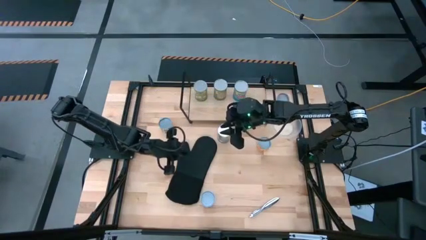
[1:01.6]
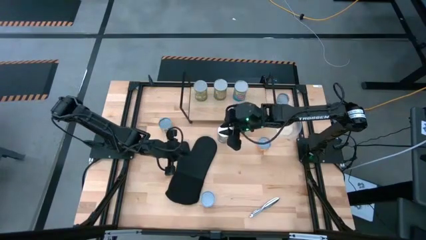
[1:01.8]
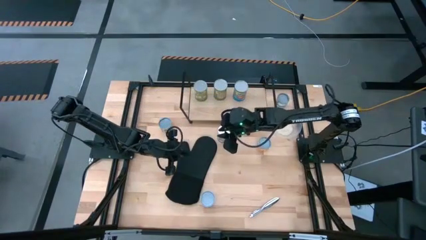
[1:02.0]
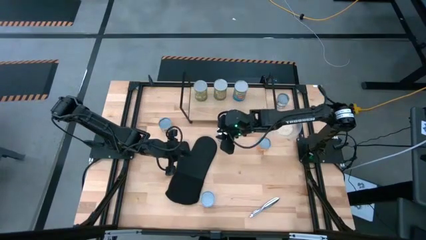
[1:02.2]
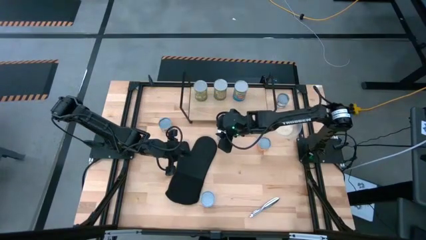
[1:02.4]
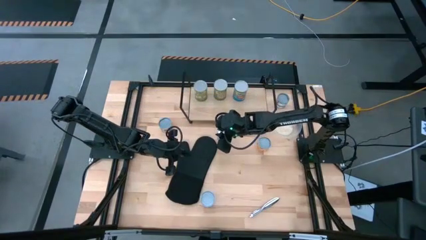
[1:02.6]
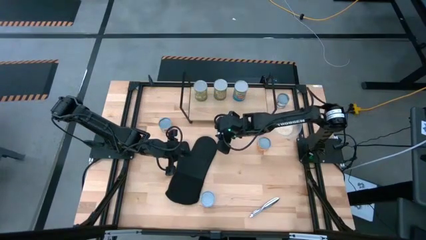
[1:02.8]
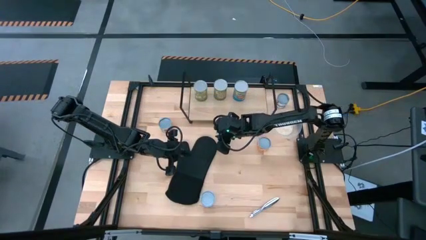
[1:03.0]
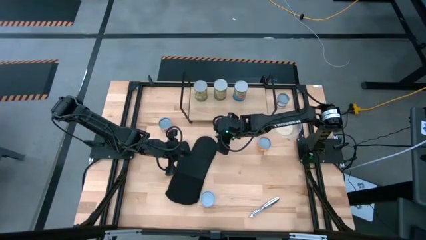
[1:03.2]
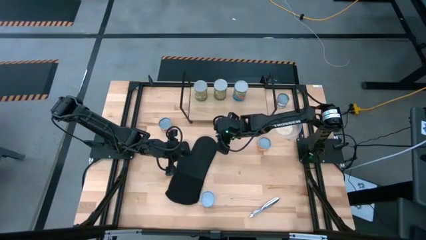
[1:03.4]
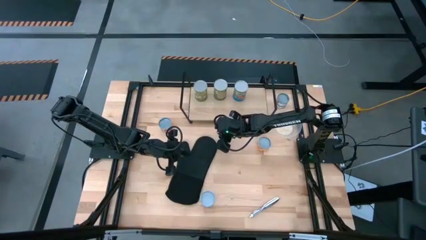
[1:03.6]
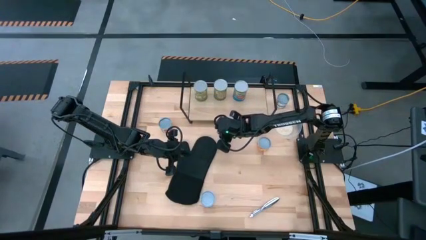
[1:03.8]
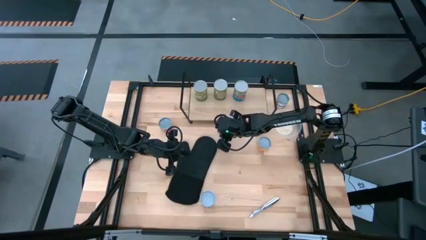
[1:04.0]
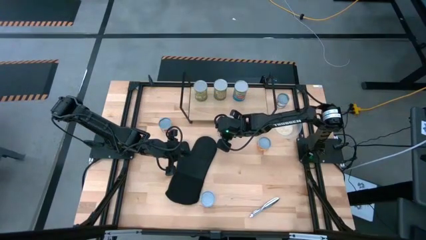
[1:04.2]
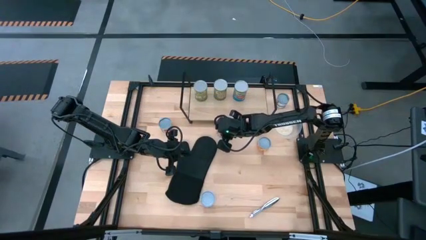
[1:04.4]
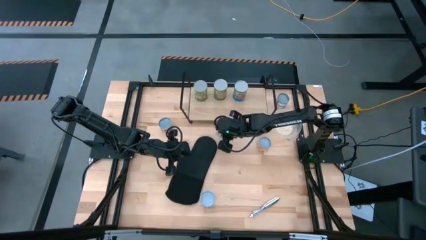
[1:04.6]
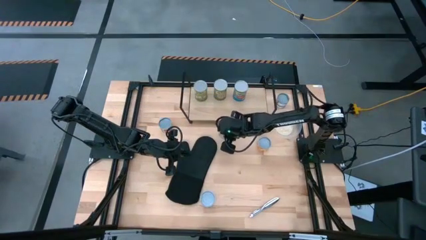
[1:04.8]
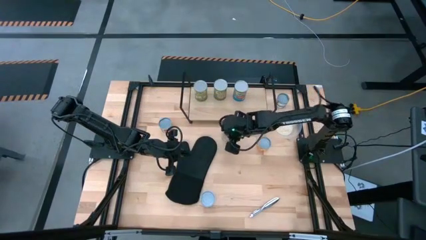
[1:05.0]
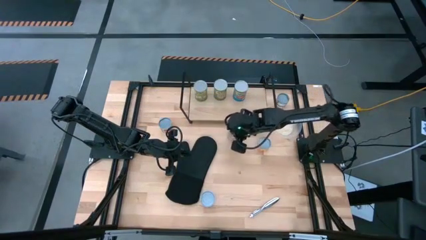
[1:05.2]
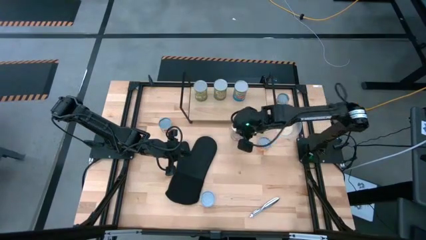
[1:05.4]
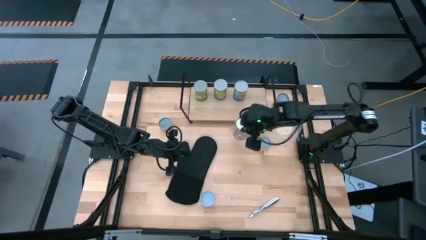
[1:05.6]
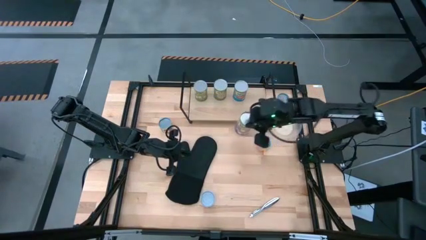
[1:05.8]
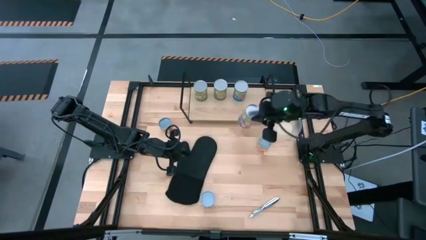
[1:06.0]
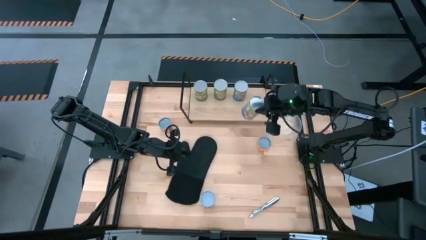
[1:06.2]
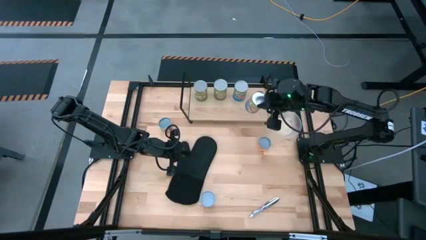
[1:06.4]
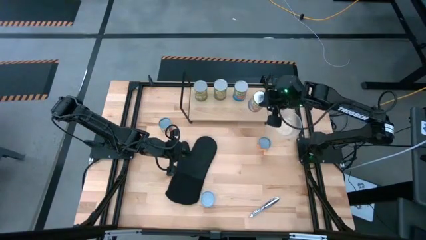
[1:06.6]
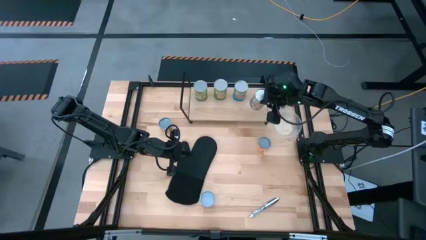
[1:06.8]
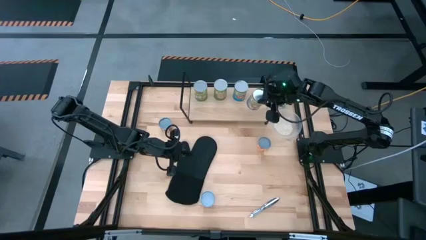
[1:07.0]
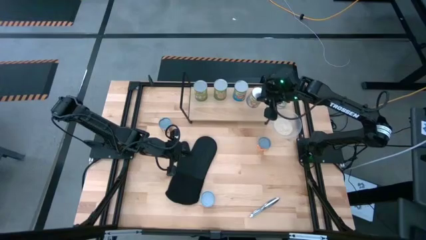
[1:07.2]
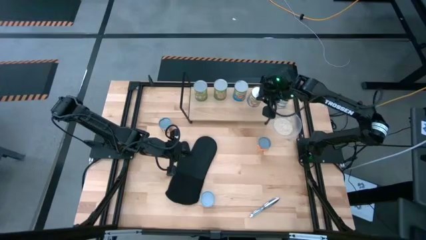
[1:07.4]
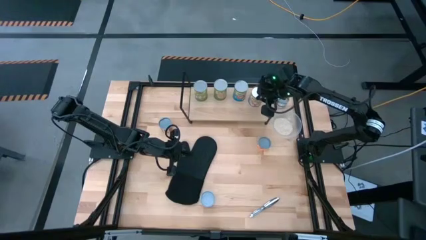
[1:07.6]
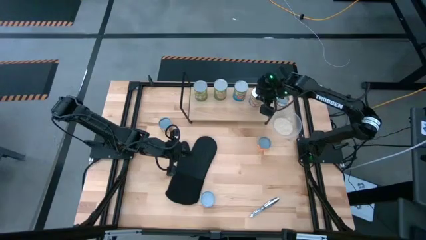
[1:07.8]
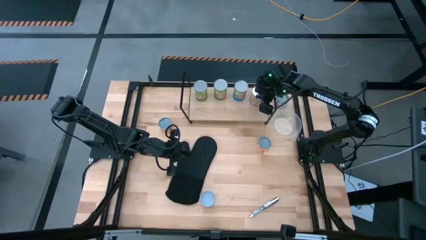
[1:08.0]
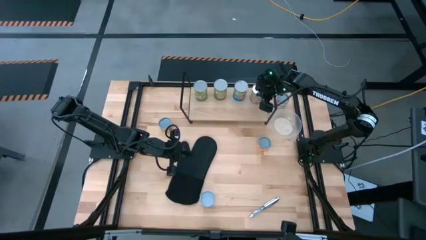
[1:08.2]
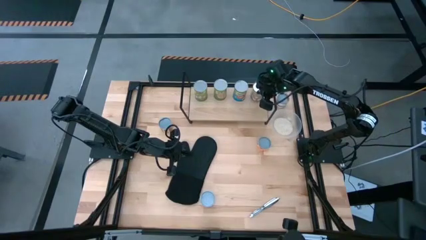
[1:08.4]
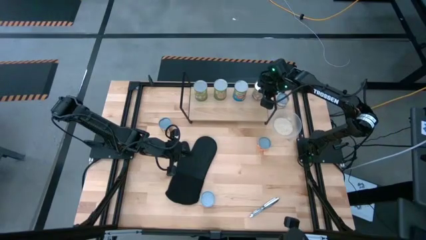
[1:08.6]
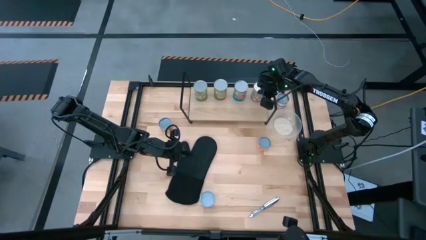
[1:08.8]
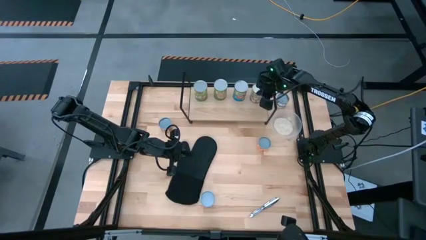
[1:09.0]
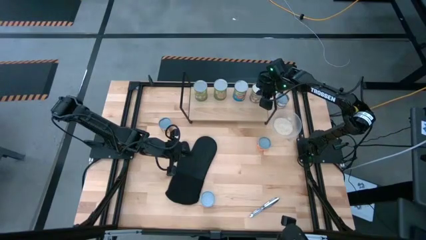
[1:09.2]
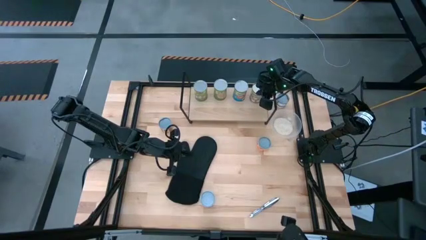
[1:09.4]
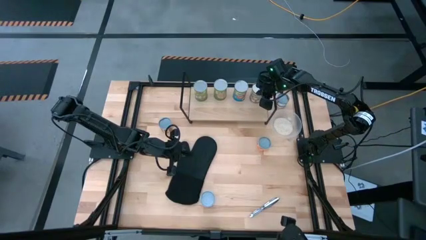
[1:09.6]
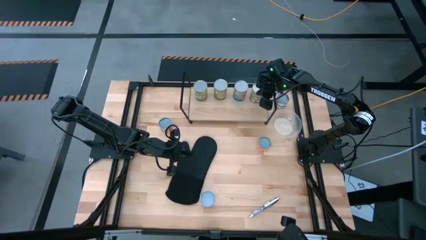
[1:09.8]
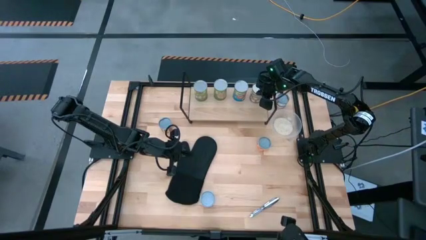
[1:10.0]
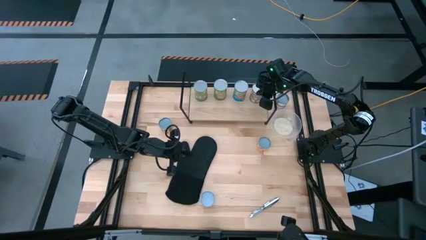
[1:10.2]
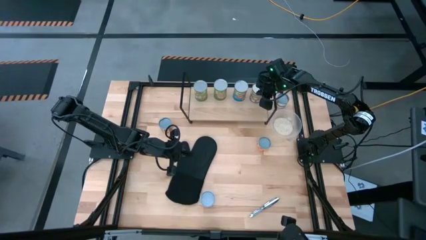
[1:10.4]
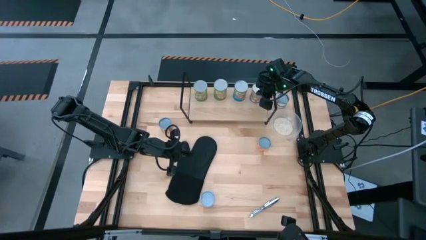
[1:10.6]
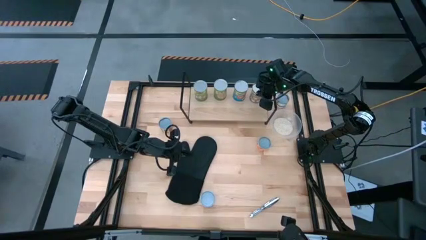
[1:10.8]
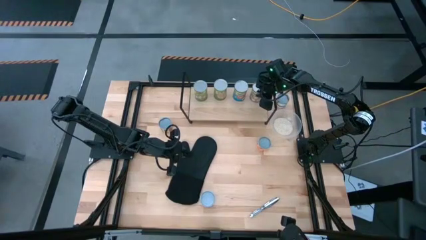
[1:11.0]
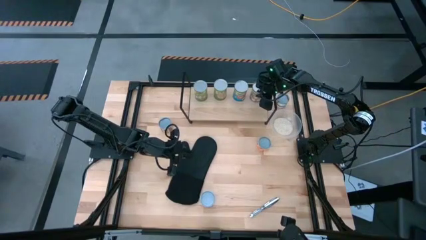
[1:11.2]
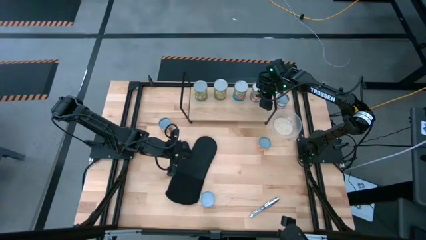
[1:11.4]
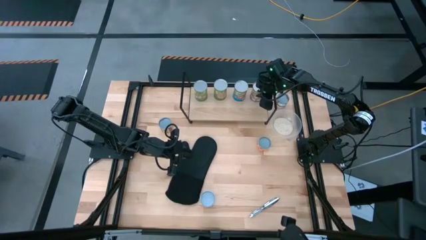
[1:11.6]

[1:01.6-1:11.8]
Task: Pick and place cans onto a shelf
Put the canned peaches on the shelf
